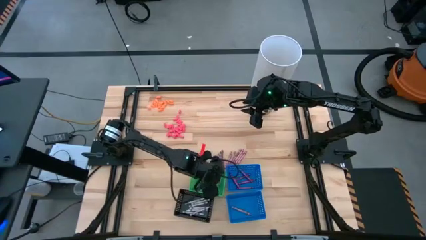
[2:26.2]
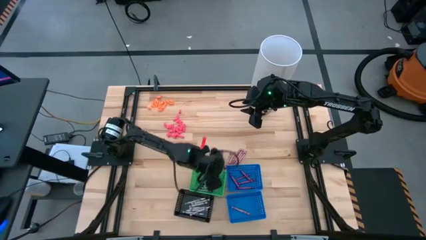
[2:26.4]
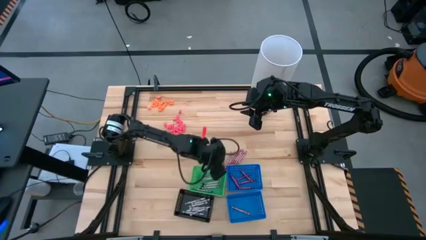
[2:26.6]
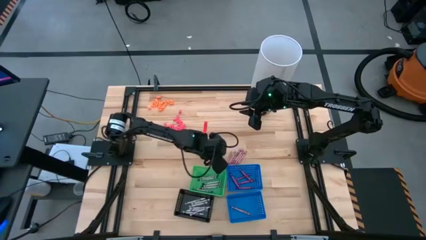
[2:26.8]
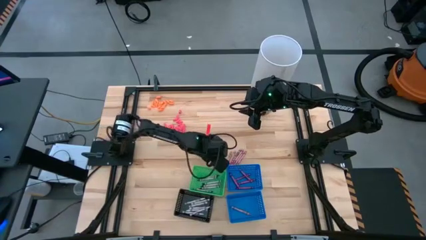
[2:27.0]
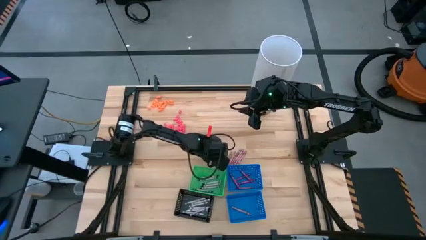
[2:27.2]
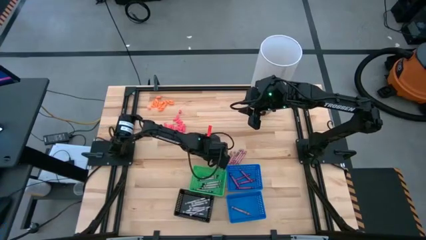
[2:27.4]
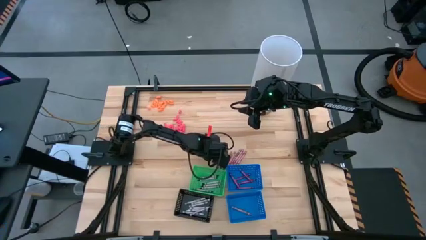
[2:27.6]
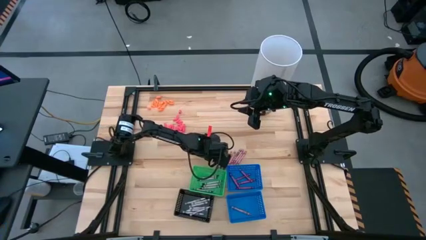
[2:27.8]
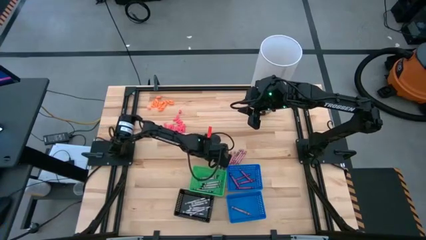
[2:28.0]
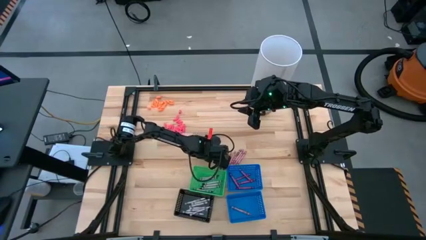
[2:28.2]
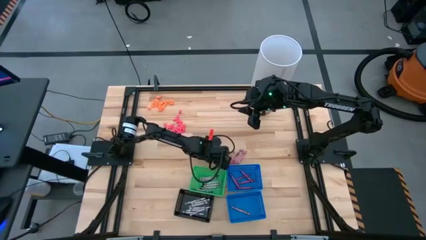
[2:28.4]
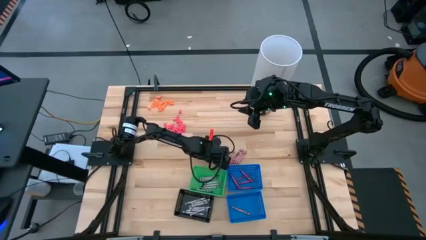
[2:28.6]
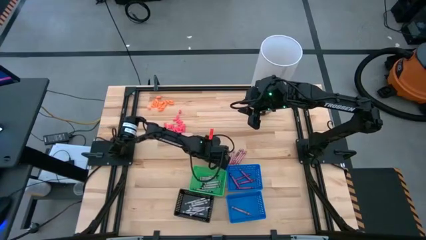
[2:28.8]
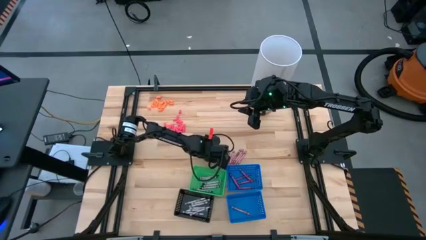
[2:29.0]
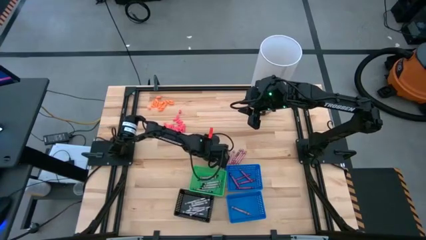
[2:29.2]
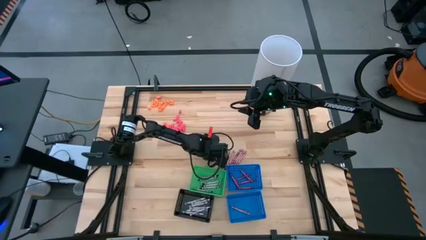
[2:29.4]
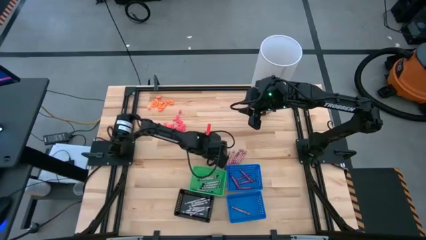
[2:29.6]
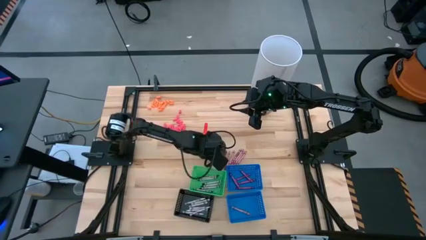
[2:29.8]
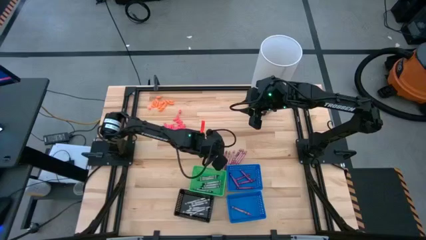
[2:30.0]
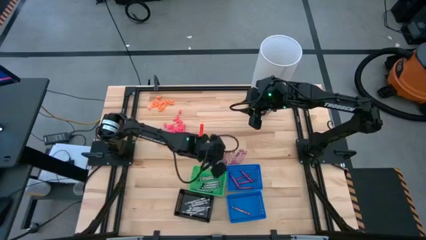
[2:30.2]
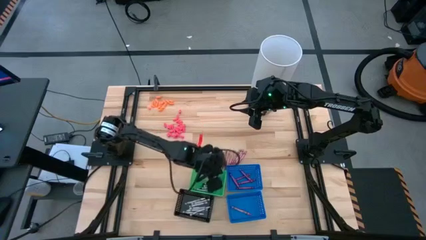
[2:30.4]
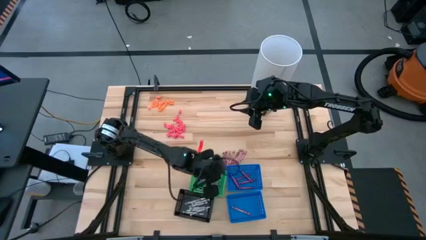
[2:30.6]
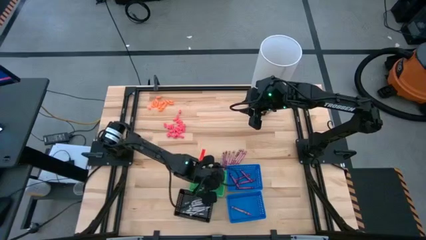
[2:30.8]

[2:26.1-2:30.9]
Task: Sort crayons
Put the black crayon into the green bin

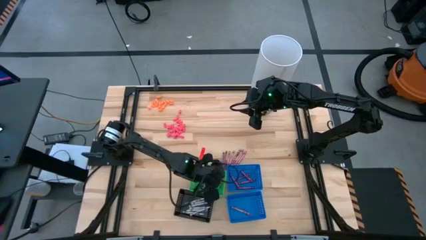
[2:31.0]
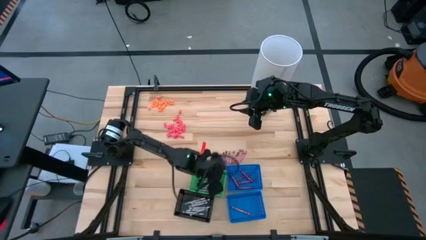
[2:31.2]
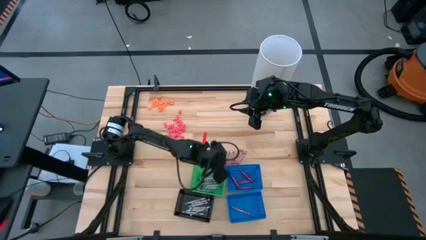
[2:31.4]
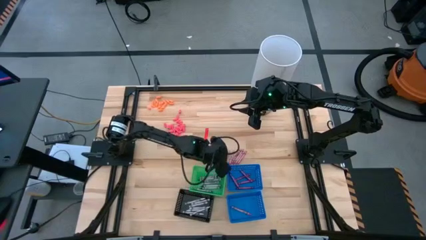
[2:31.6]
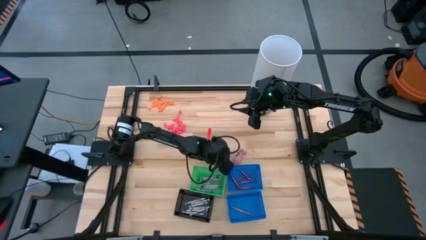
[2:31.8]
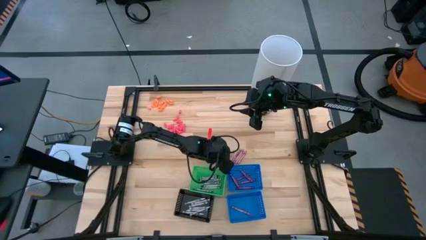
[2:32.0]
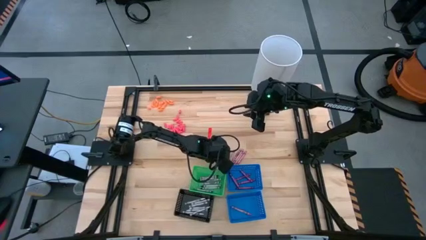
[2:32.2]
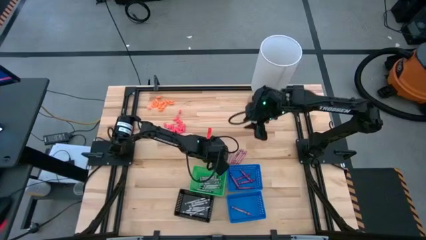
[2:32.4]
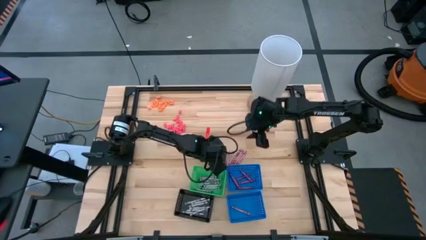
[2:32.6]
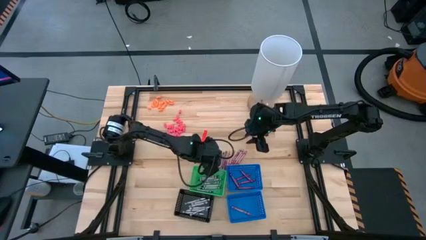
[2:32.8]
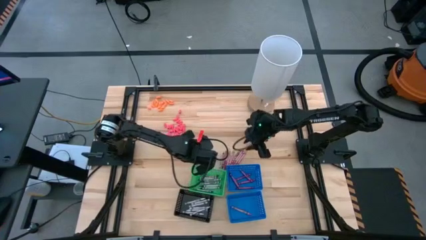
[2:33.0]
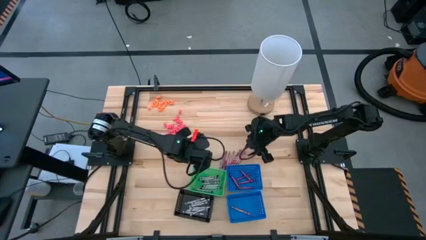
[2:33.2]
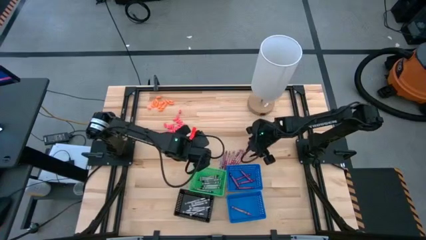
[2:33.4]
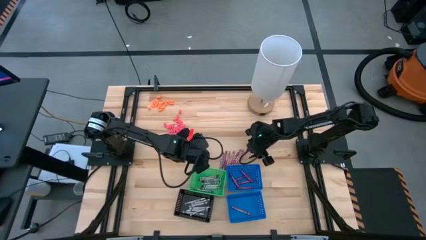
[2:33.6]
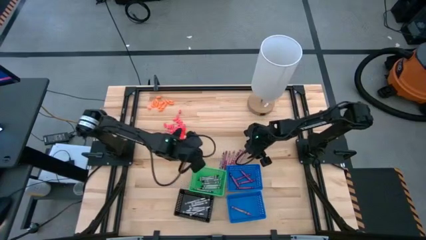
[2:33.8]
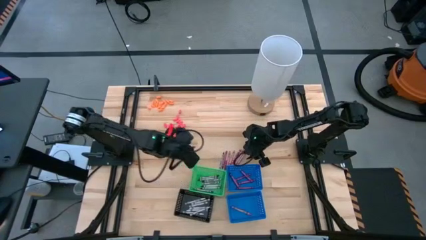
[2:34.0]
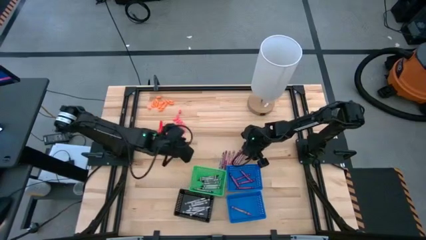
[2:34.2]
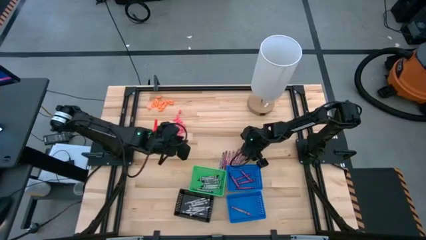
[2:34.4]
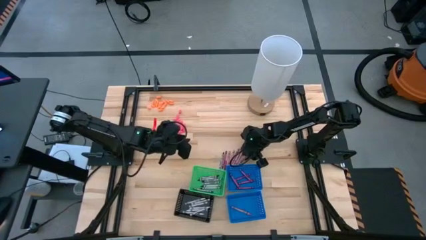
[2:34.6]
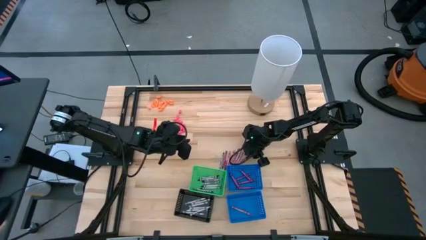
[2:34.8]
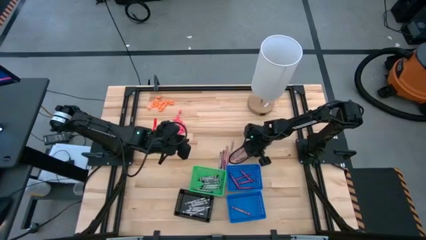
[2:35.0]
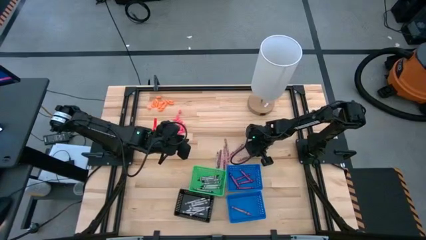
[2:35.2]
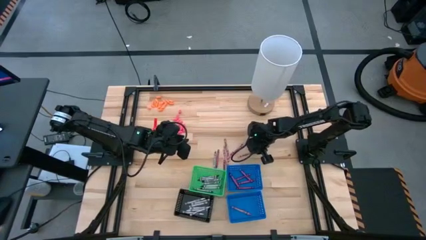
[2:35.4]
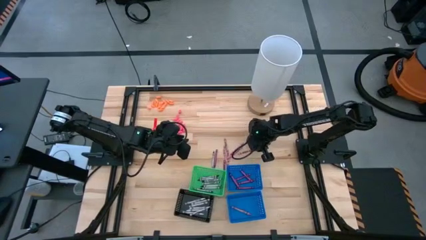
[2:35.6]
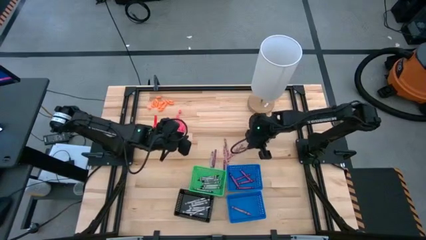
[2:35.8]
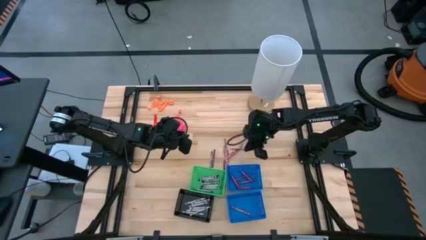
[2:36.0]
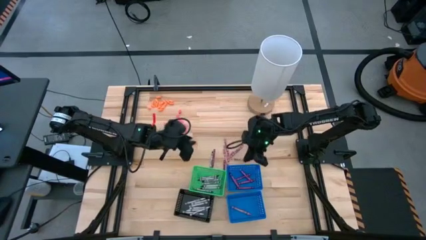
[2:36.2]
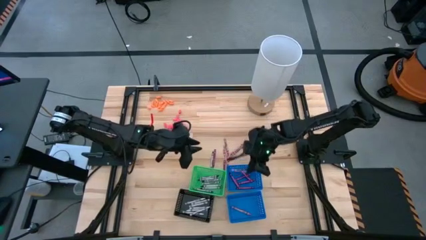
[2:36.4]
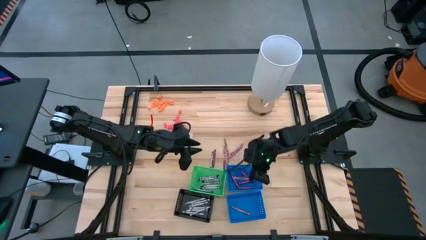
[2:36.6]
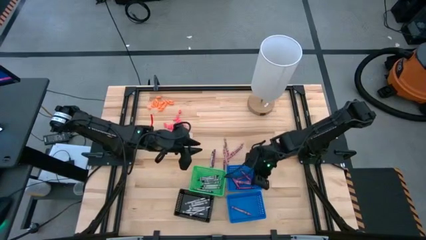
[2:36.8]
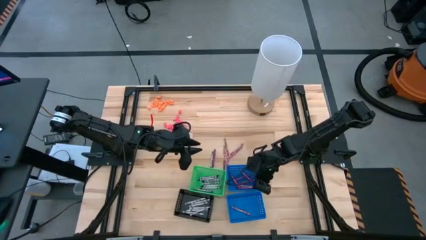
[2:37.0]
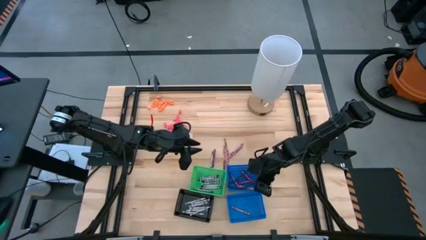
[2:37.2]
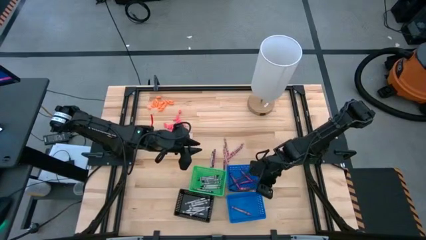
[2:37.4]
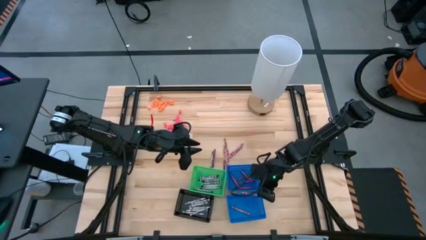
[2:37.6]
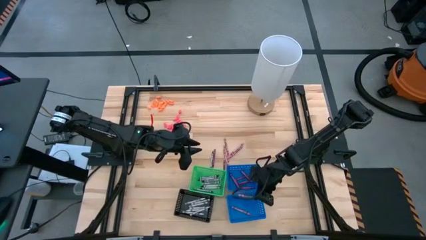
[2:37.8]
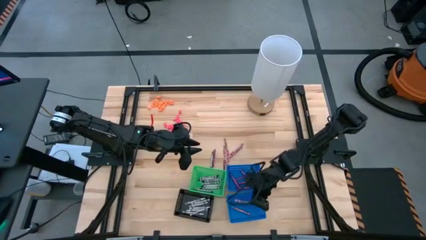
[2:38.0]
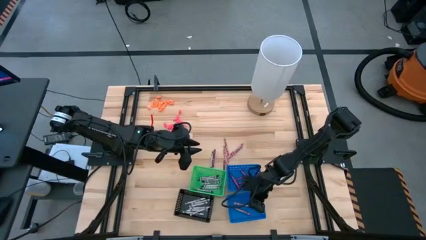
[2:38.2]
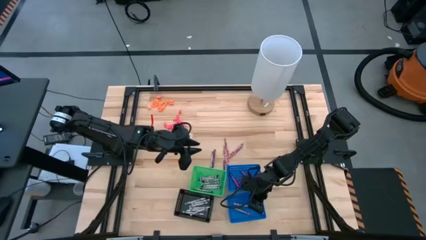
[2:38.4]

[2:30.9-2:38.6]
Put the pink crayon into the bottom blue bin

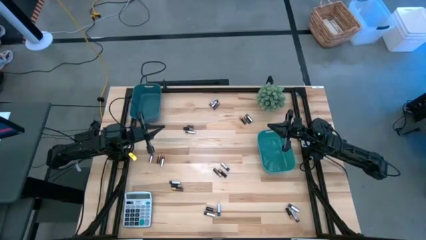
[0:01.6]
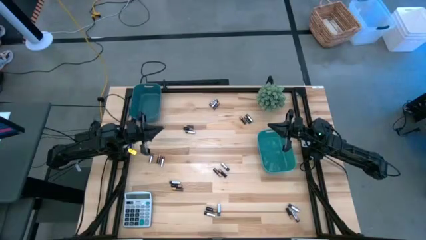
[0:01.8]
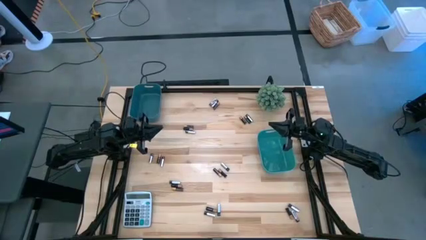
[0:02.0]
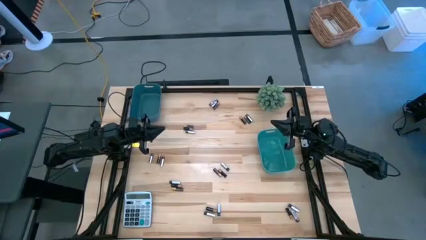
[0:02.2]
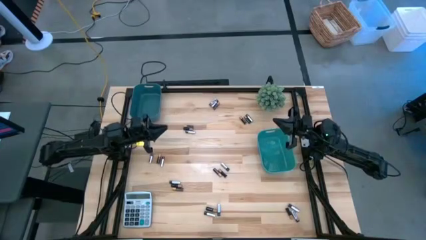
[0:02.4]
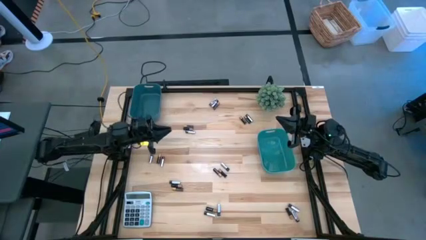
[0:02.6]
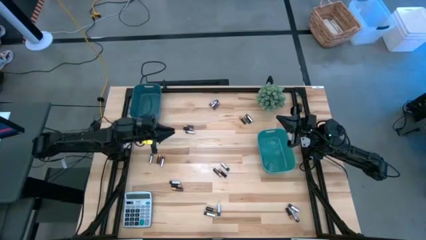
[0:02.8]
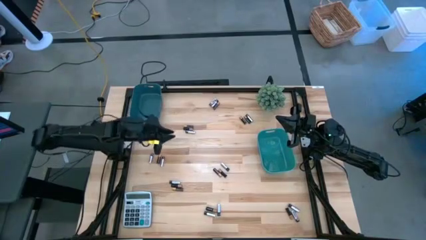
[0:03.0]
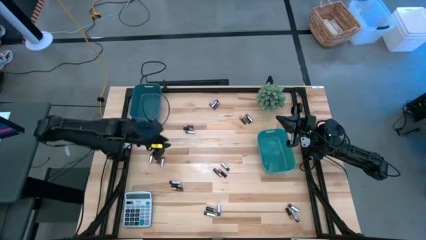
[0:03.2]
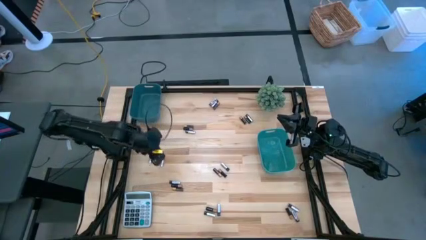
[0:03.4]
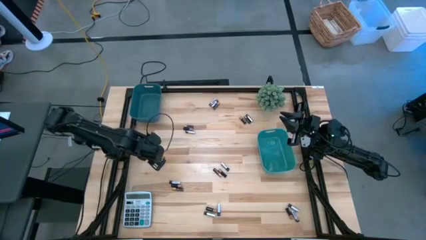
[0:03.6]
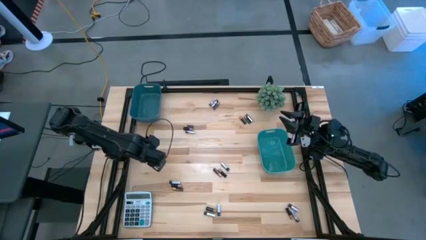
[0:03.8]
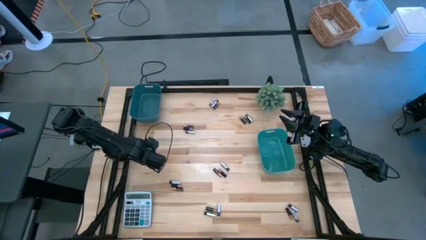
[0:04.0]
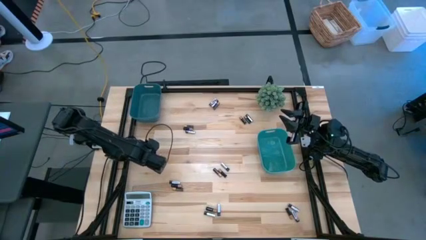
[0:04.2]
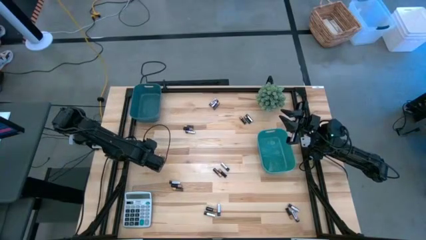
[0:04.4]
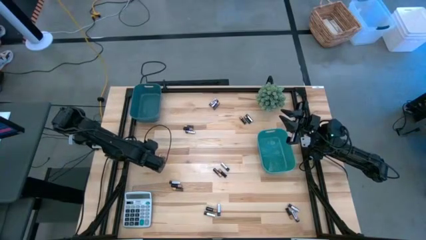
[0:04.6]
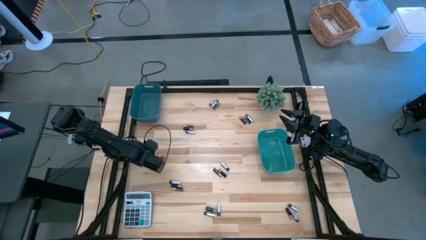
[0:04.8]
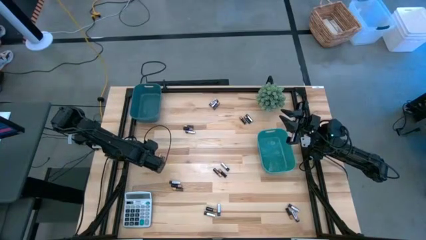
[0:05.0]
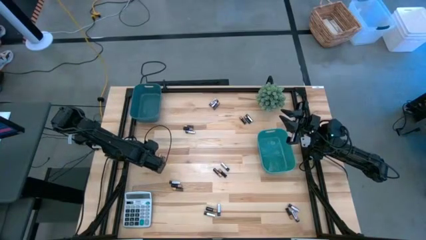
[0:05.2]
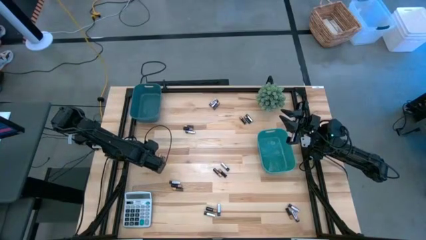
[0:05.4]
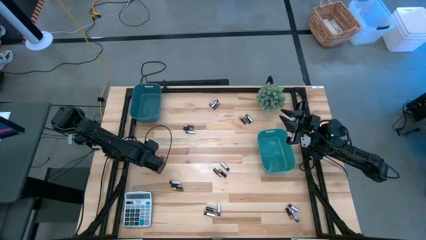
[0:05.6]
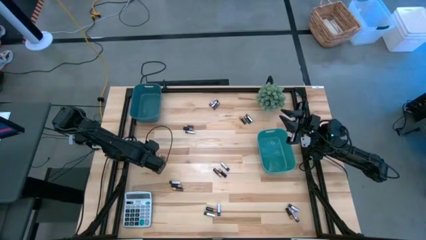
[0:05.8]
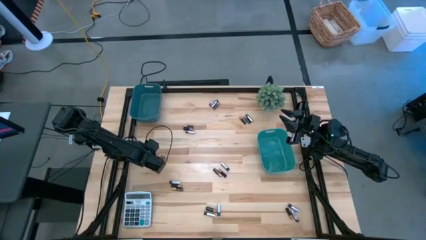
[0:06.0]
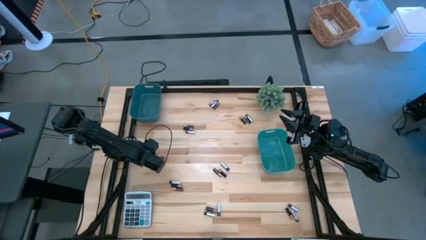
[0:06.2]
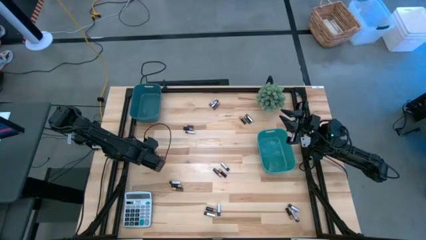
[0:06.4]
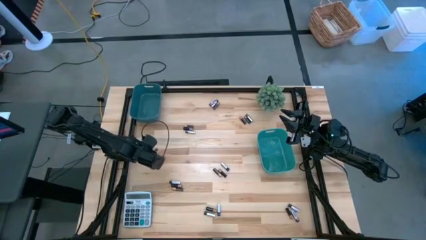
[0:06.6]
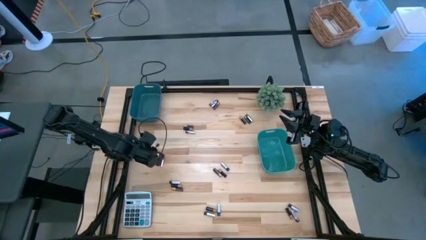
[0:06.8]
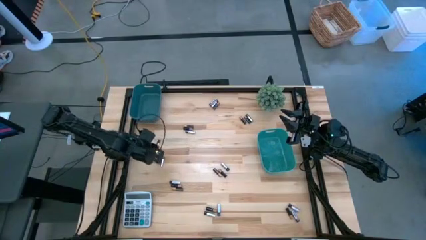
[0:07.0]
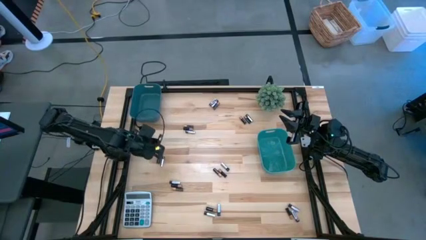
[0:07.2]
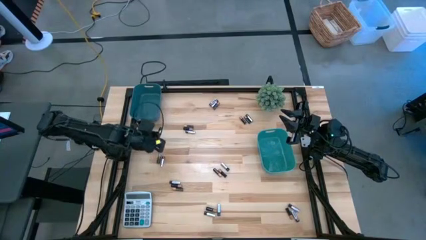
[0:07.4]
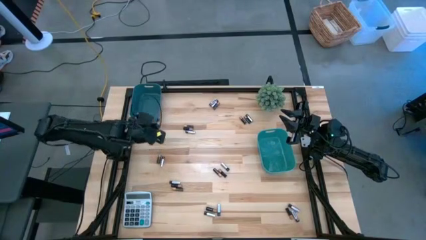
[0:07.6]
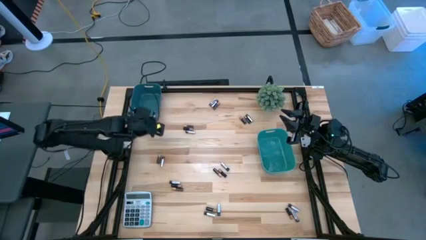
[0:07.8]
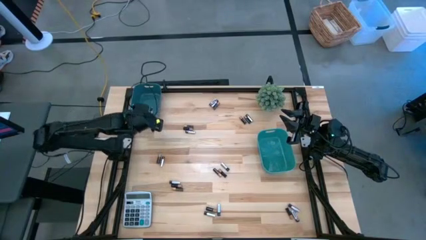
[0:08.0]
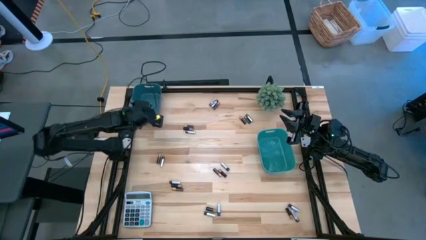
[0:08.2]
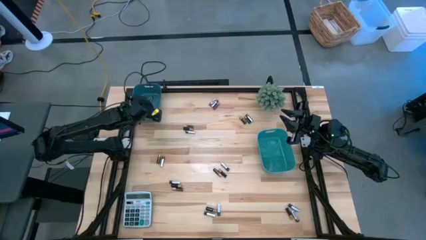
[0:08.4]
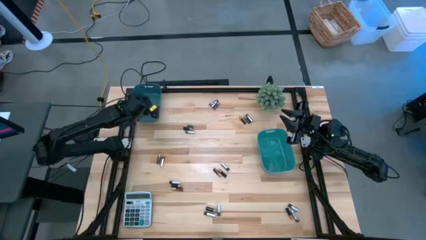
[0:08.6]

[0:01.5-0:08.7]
Task: Sort batteries
Put the silver battery into the blue bin
